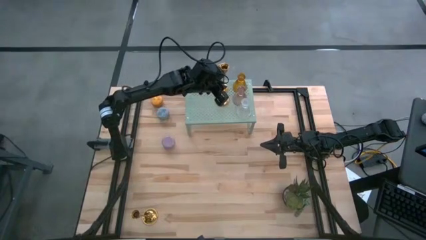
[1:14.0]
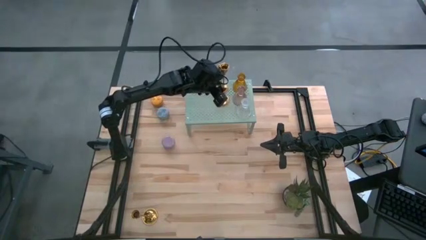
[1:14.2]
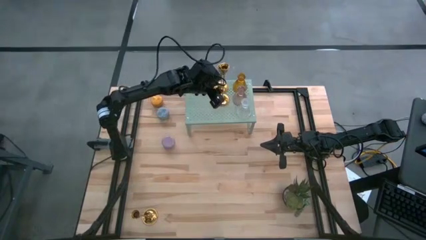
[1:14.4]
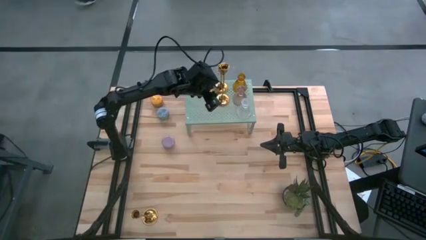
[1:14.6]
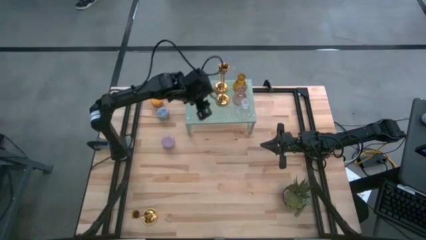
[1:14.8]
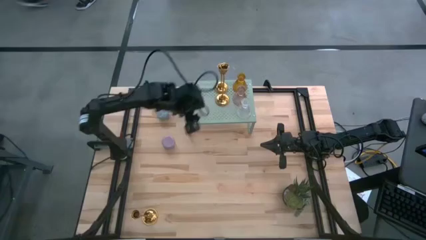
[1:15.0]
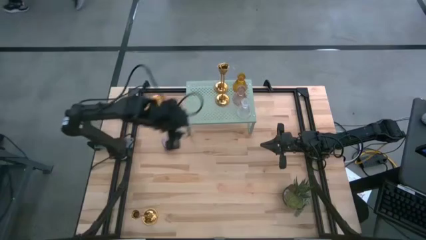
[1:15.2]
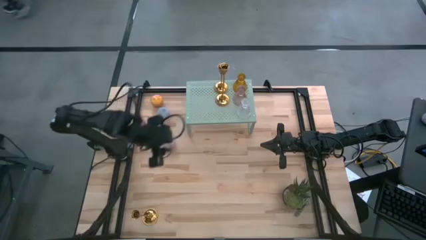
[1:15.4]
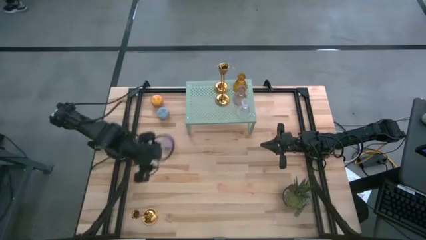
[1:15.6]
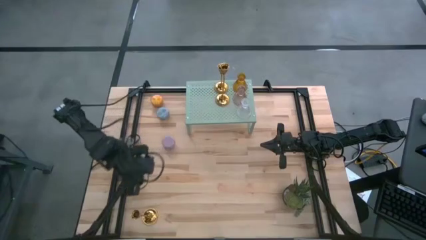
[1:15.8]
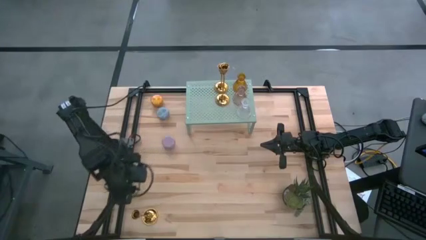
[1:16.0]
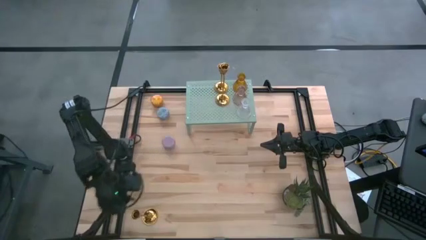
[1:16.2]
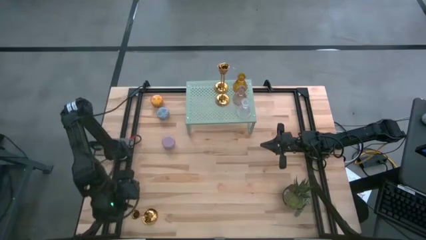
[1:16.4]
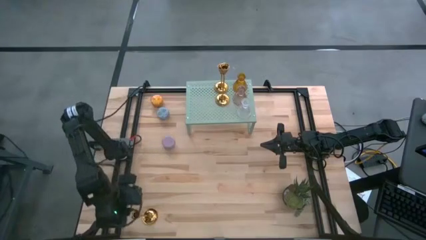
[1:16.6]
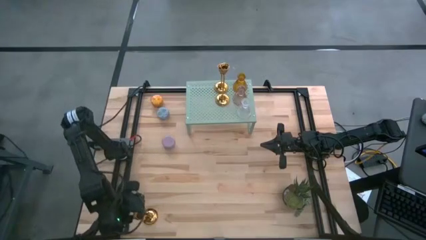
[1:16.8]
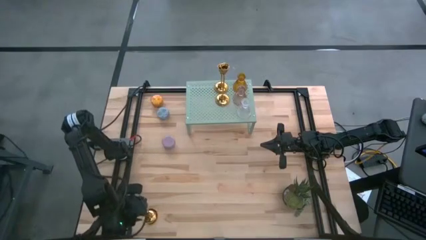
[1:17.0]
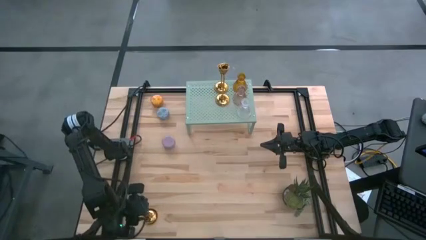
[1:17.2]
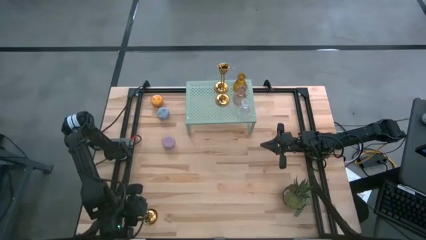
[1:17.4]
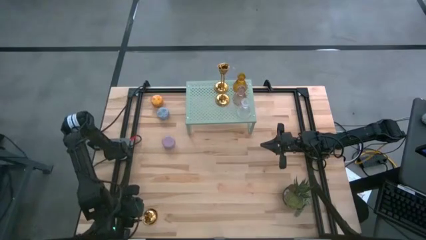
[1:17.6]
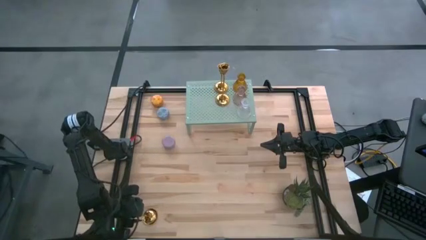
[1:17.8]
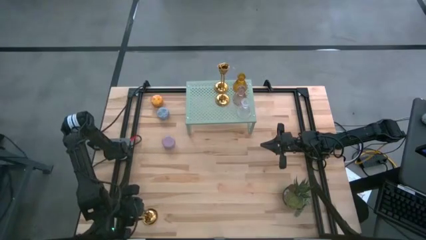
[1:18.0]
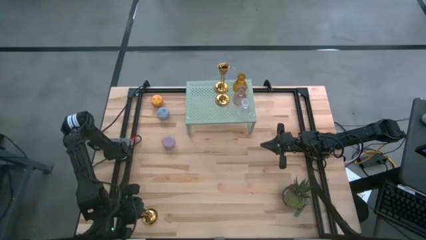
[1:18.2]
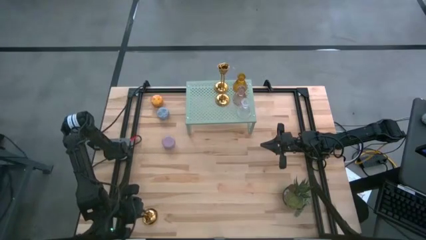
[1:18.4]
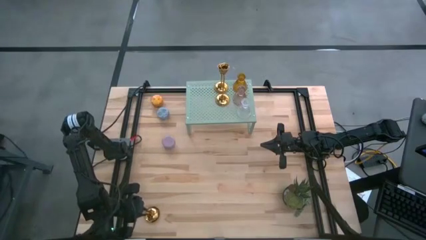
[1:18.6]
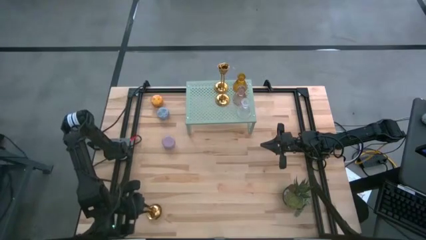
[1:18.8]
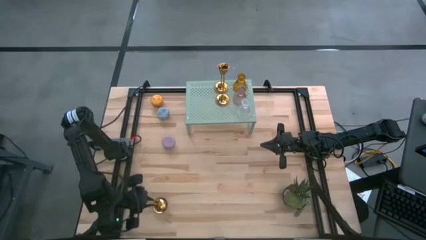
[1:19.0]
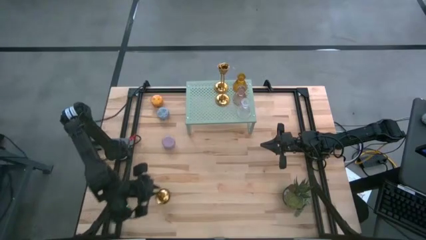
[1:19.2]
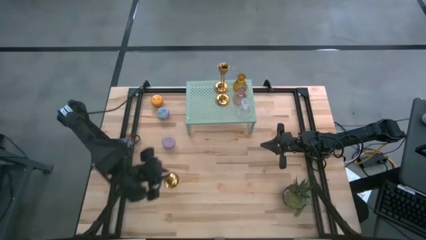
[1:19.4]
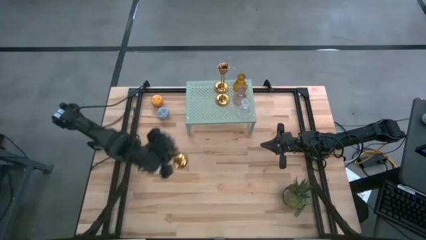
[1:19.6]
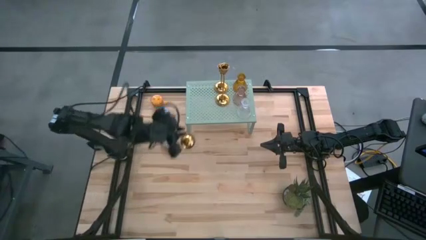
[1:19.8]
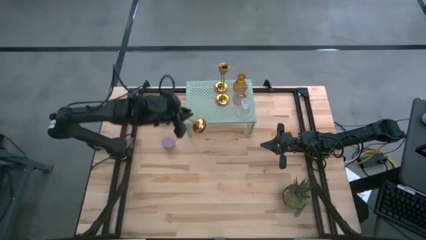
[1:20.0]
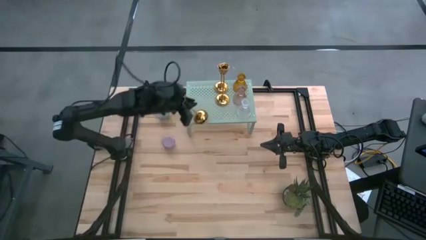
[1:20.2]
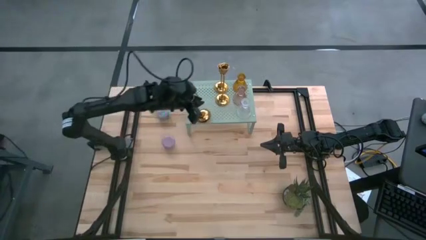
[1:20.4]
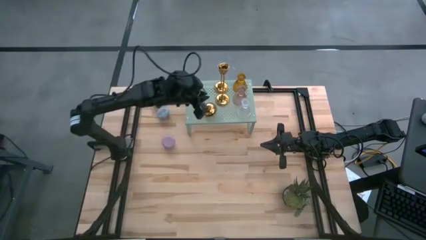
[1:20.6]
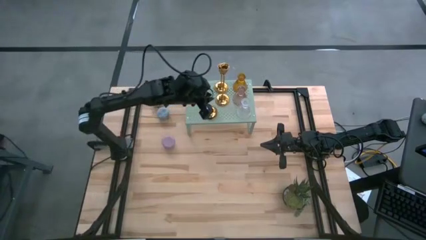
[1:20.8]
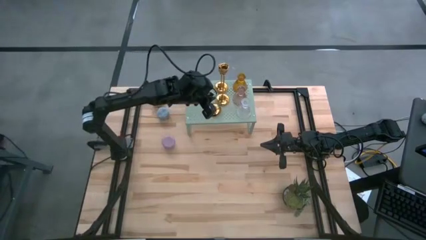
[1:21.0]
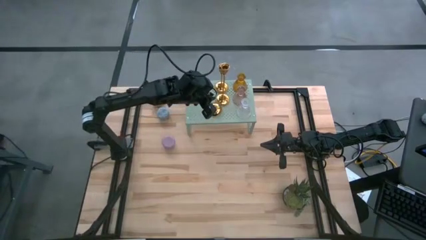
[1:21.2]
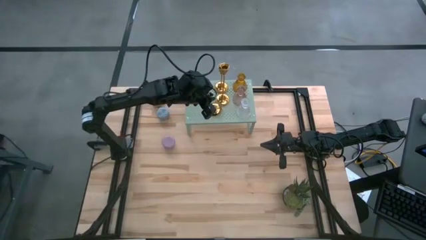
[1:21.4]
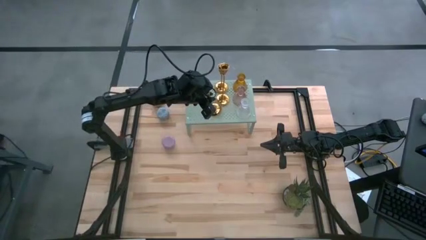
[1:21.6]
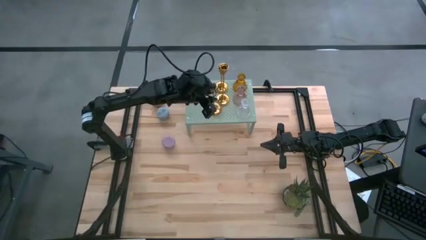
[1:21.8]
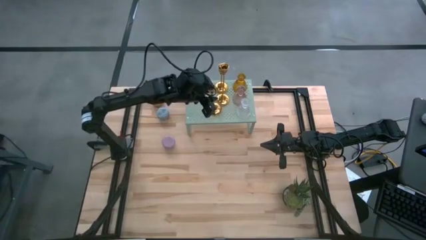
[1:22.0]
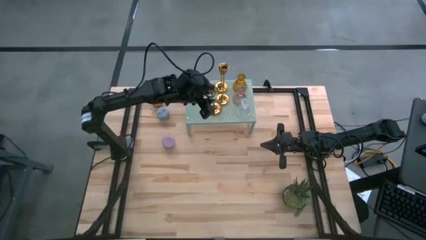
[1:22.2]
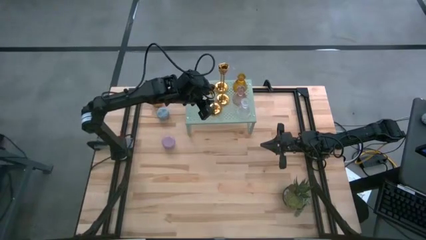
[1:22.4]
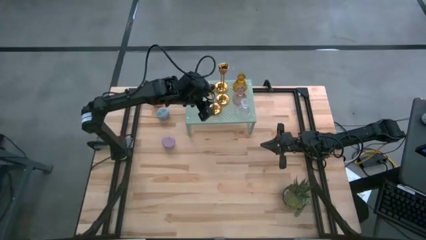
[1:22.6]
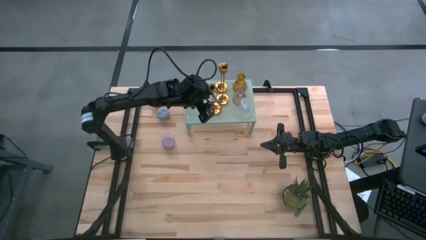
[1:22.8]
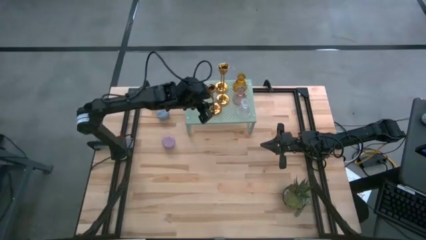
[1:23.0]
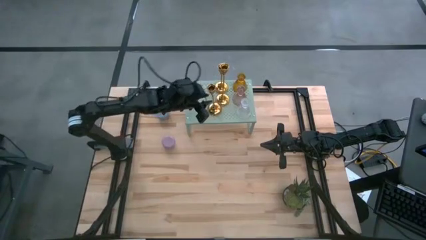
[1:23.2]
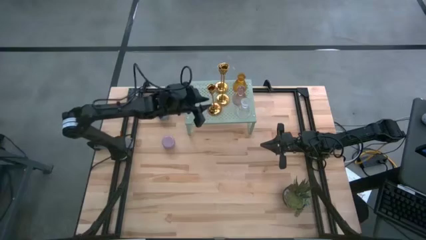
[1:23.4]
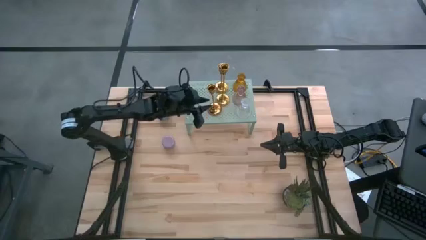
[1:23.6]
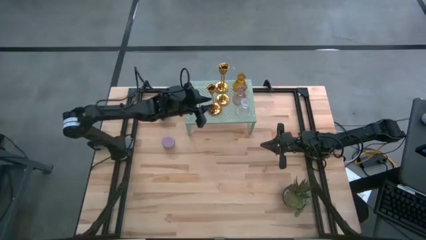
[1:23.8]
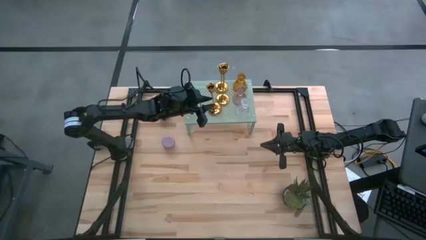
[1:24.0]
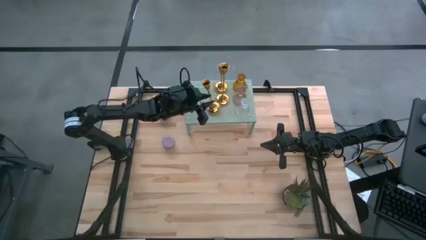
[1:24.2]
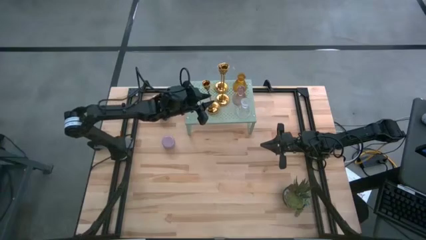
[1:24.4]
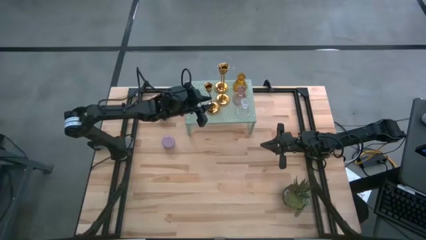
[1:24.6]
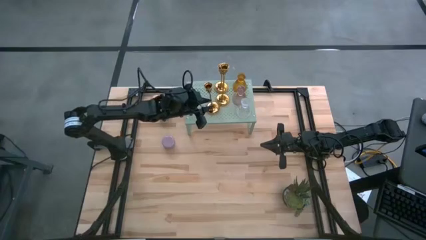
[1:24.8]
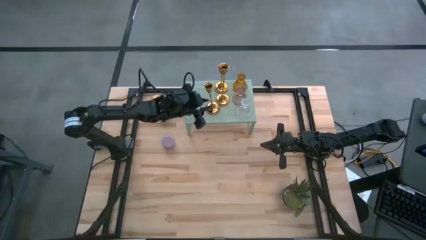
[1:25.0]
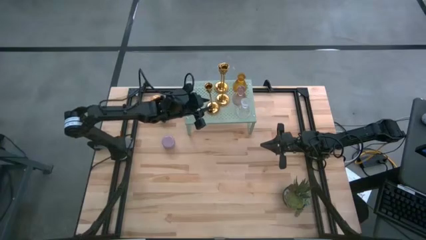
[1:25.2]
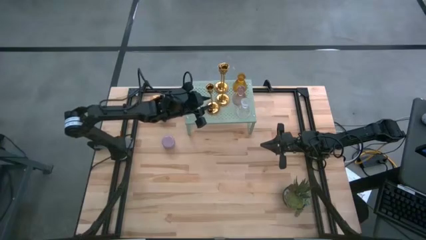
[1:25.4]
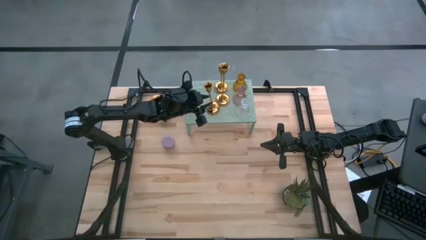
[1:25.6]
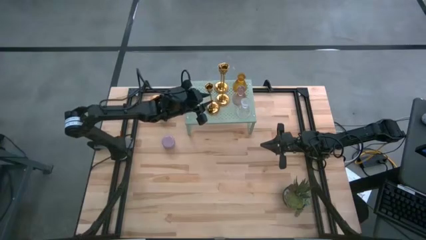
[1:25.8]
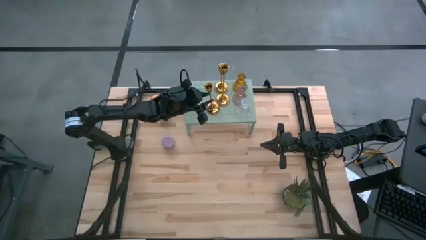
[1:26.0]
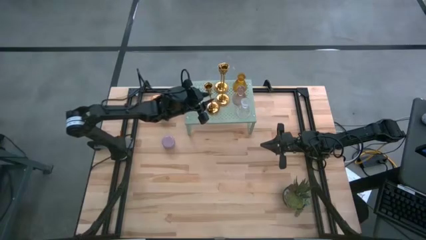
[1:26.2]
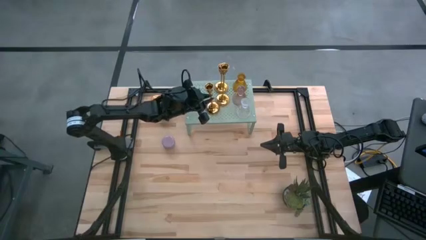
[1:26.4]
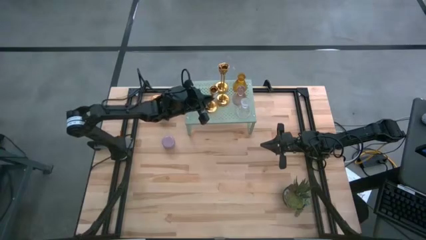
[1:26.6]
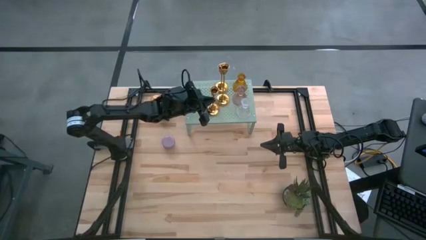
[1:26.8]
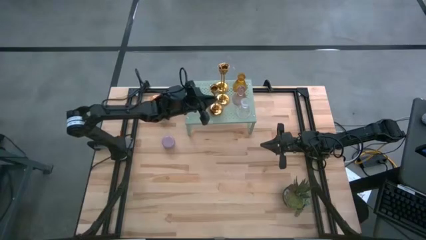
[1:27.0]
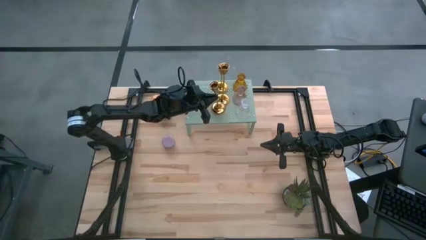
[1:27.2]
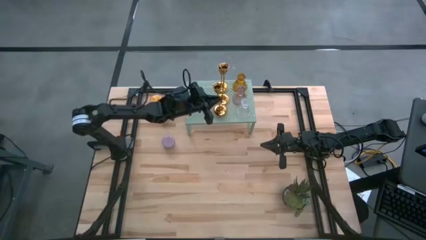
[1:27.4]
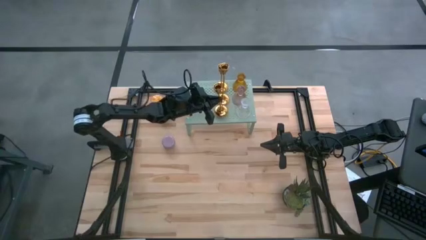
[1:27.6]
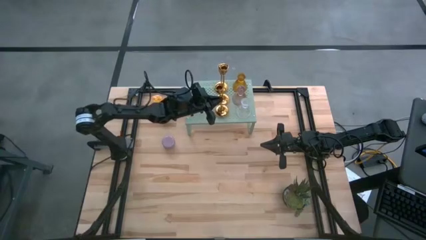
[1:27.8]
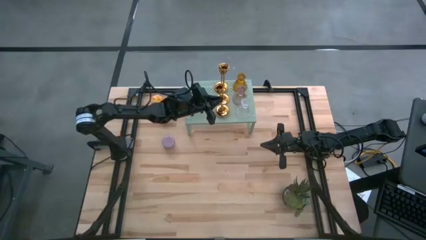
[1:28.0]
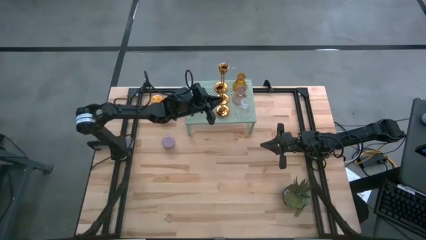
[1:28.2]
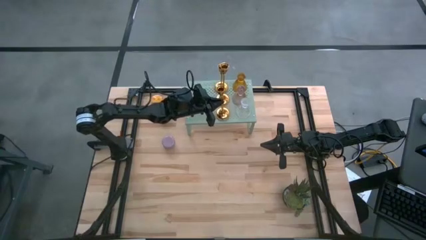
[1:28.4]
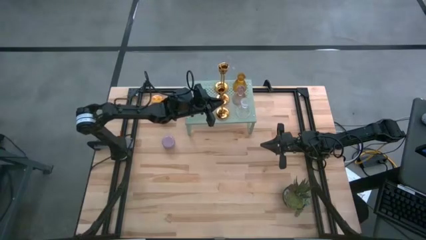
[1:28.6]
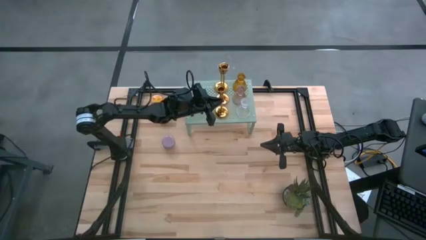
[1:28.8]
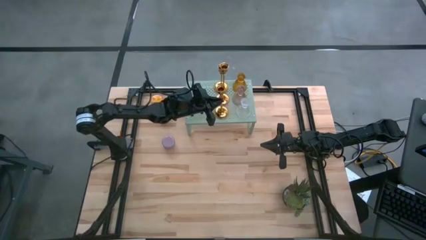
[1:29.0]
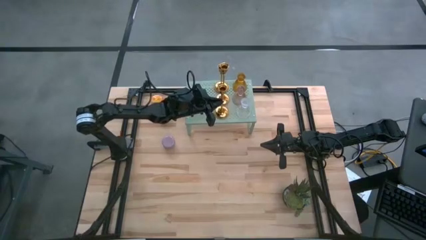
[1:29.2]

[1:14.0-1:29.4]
Task: Pick & Place candle stick holders
Put the gold candle holder on the shelf

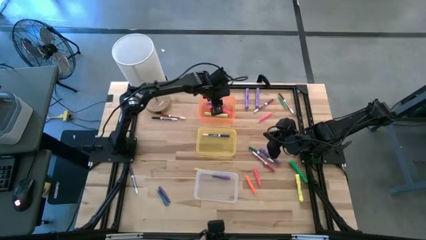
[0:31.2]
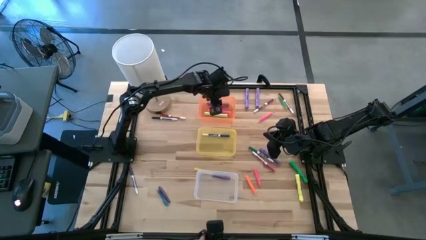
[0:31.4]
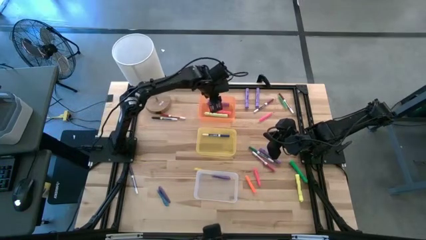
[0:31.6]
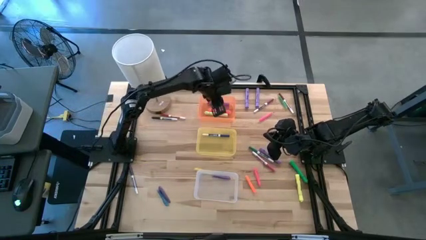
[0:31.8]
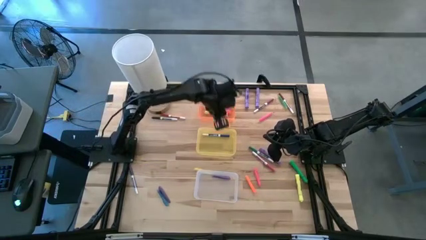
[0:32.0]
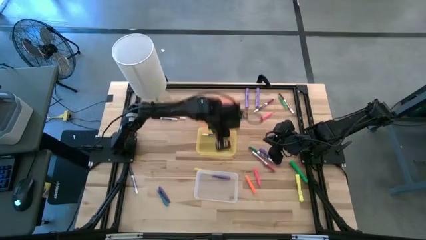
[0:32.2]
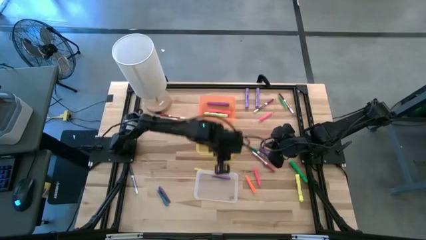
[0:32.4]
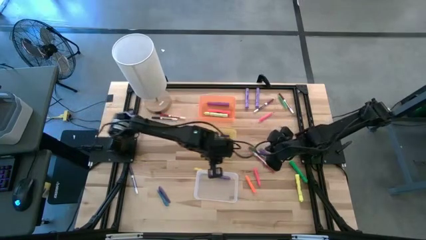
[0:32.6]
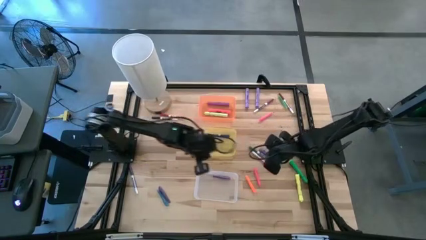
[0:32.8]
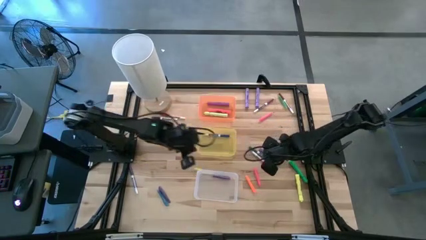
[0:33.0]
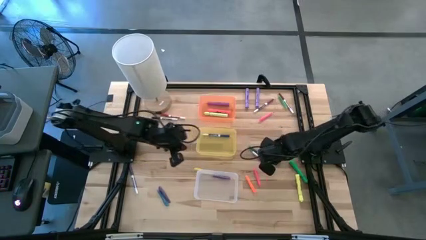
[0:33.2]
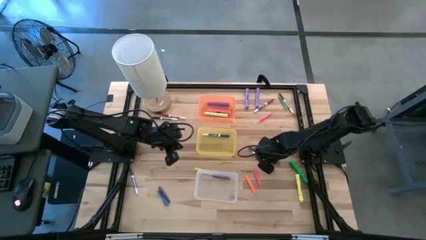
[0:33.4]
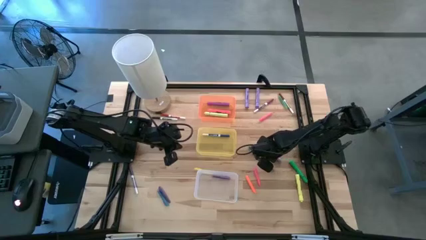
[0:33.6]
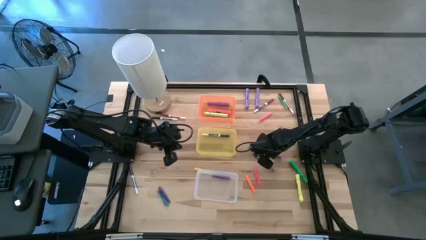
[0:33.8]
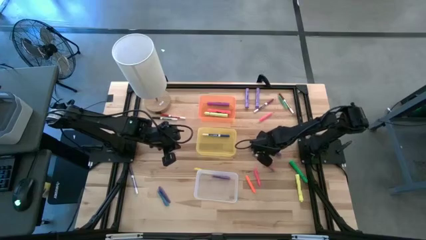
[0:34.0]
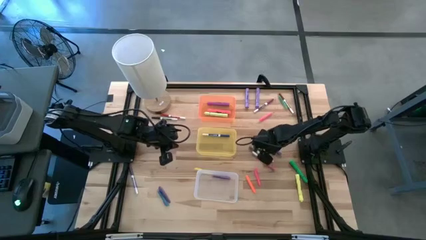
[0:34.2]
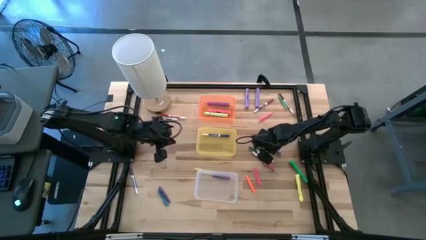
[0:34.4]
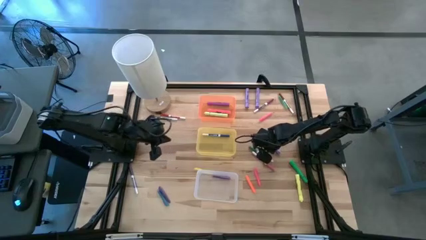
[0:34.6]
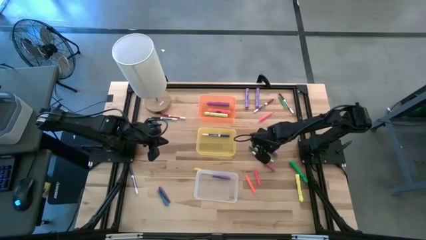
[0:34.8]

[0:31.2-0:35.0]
Task: Pick & Place Markers
Put the bottom light purple highlighter pen into the orange bin
